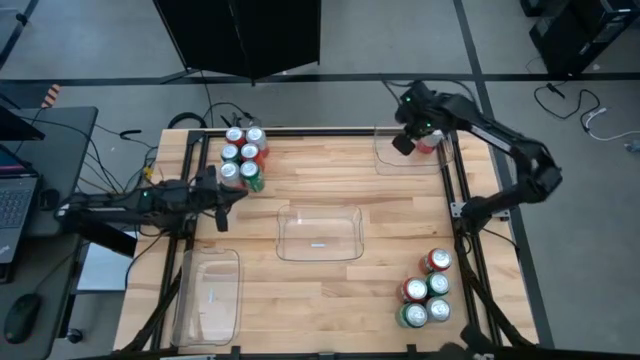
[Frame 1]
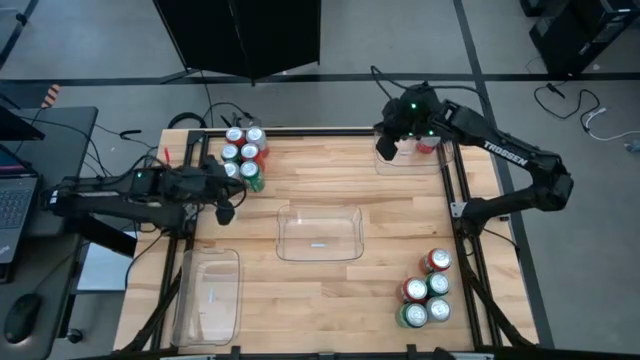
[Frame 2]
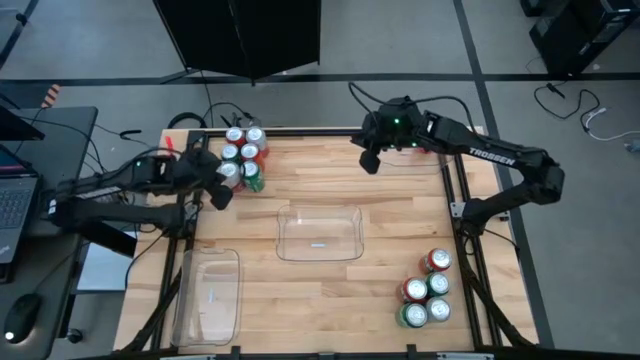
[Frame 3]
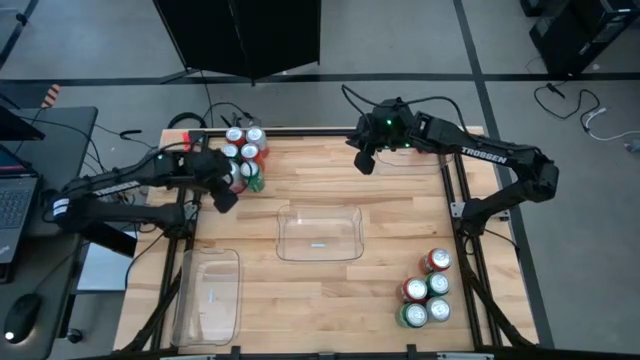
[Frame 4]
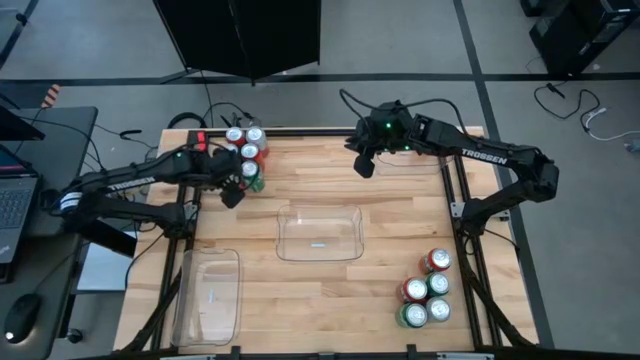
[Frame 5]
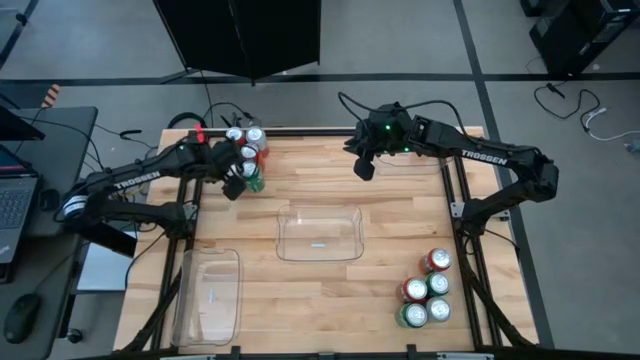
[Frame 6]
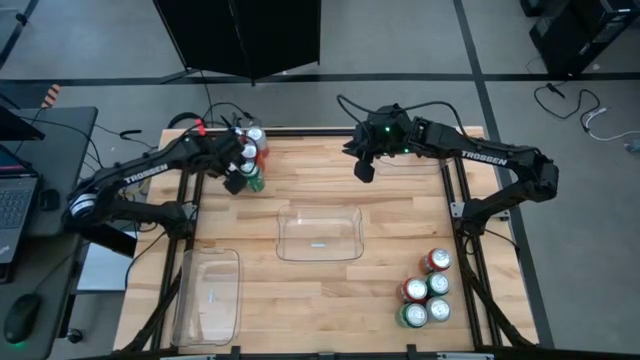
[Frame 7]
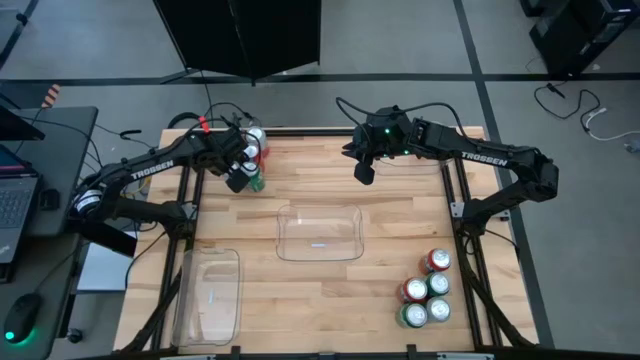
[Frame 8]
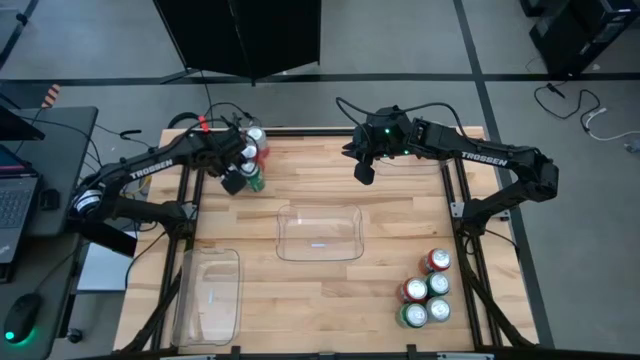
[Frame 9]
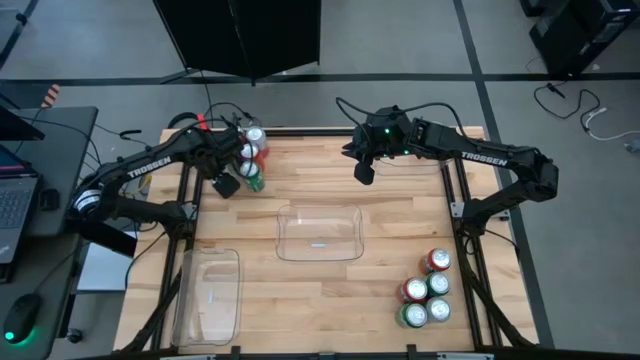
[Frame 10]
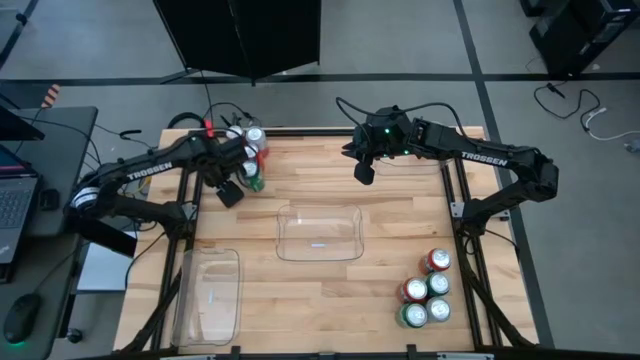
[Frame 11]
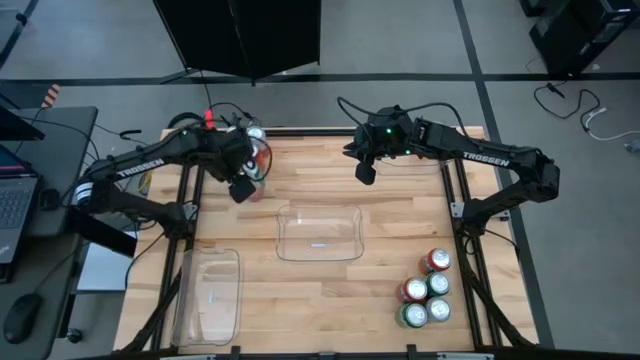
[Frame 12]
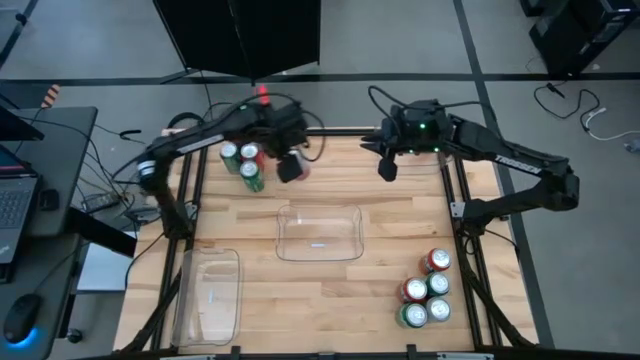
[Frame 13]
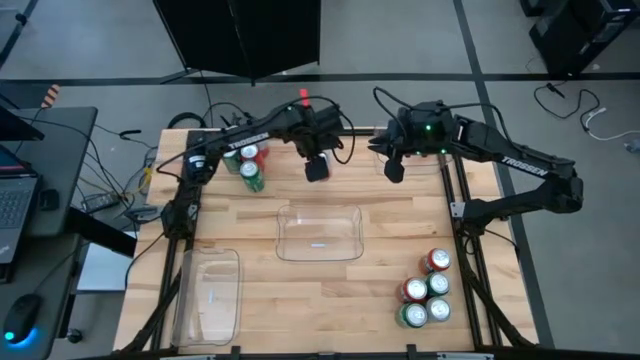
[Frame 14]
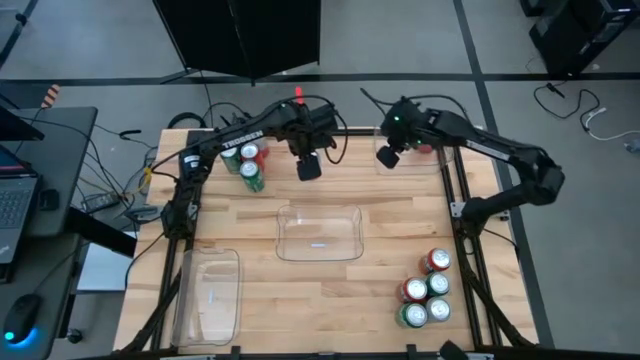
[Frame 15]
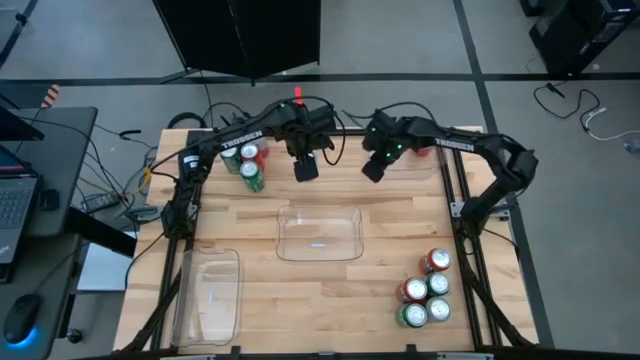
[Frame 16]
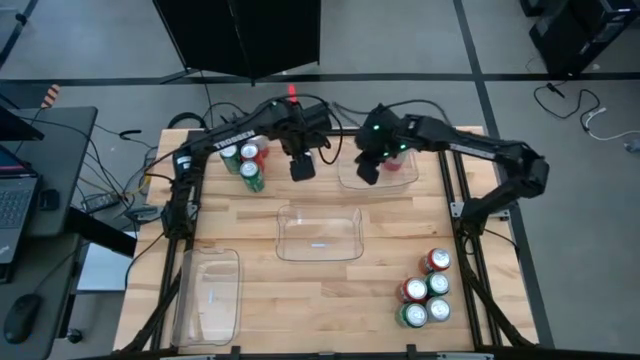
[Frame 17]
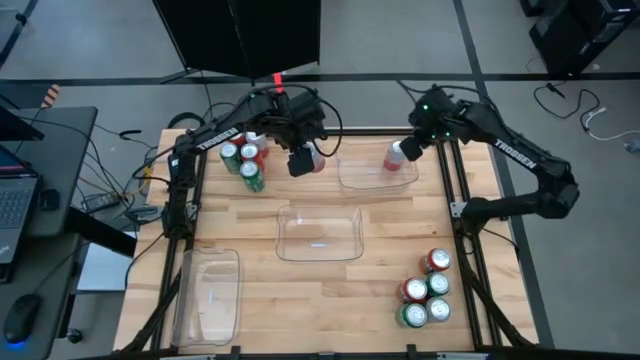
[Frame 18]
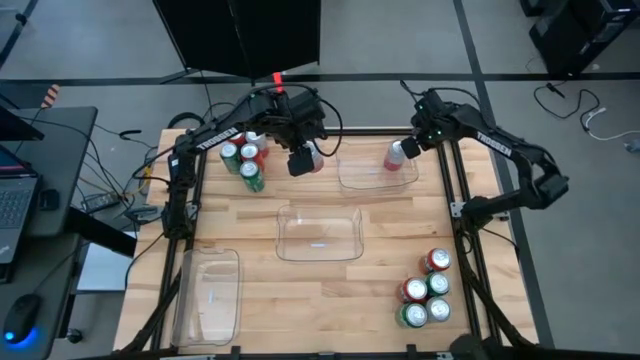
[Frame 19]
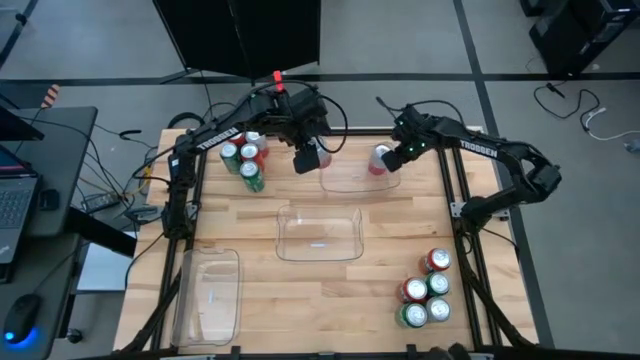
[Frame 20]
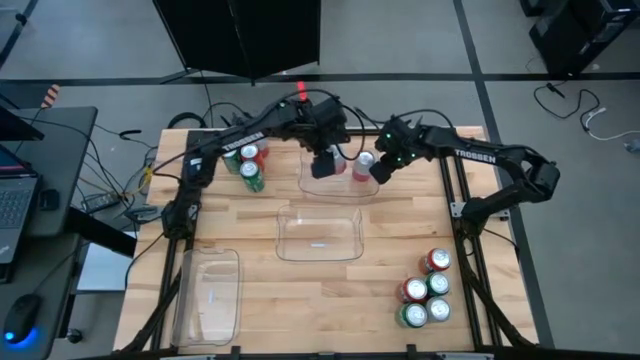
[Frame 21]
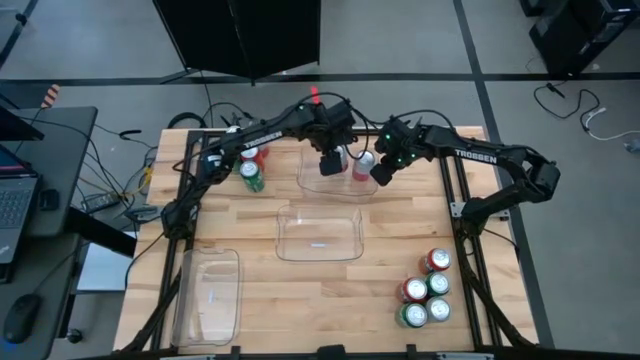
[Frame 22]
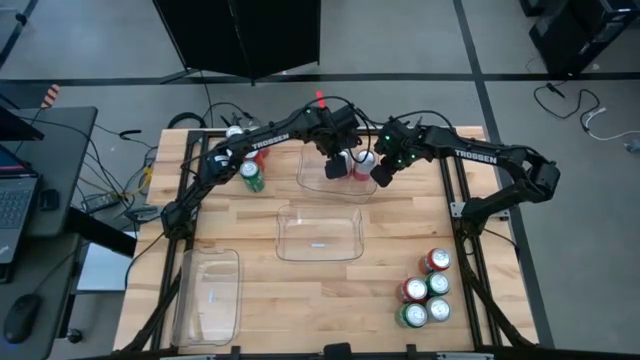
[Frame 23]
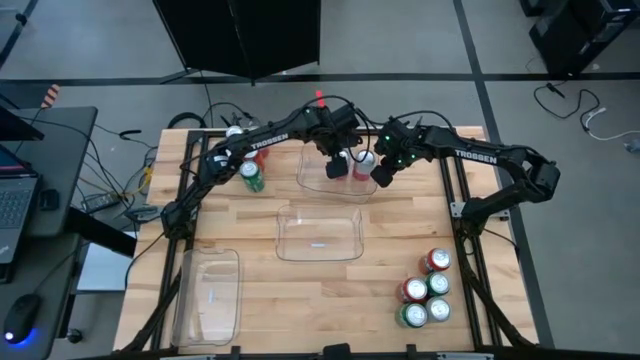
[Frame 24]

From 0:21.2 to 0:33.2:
Task: Sort soda cans
Put the middle pink white soda can into the top transparent bin

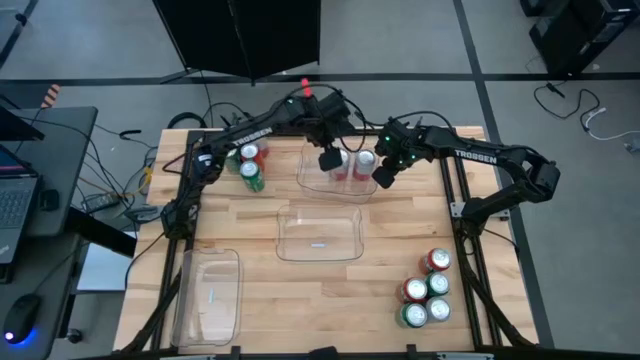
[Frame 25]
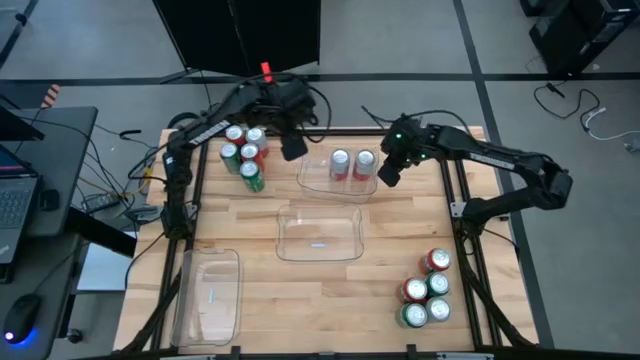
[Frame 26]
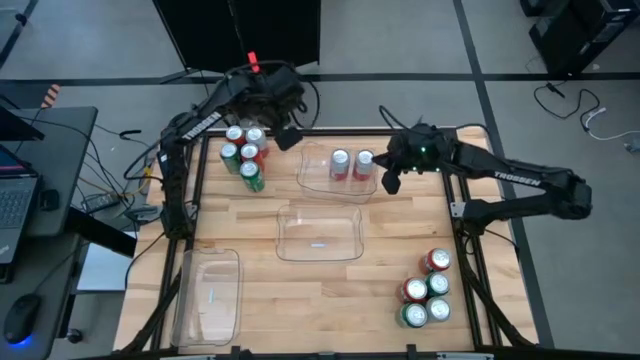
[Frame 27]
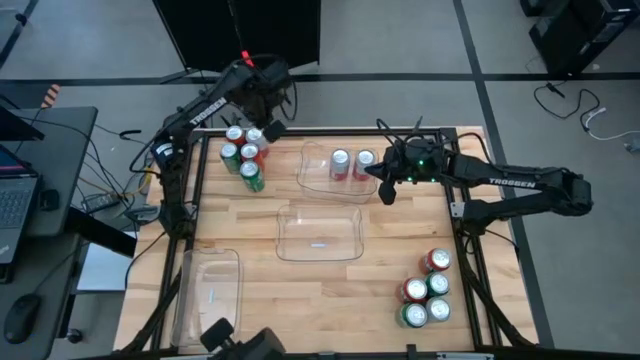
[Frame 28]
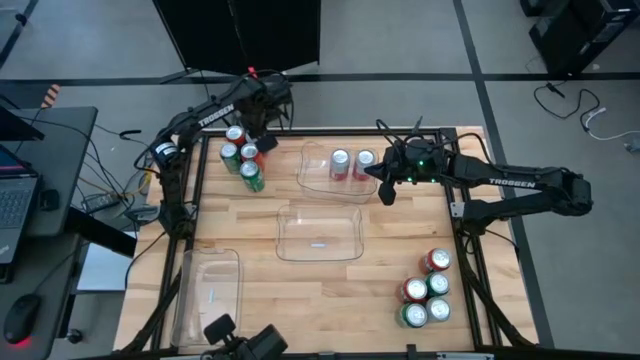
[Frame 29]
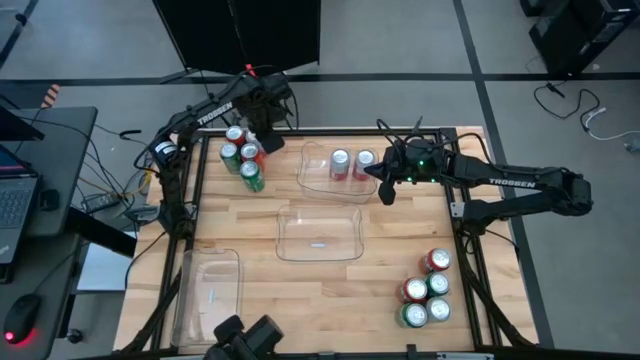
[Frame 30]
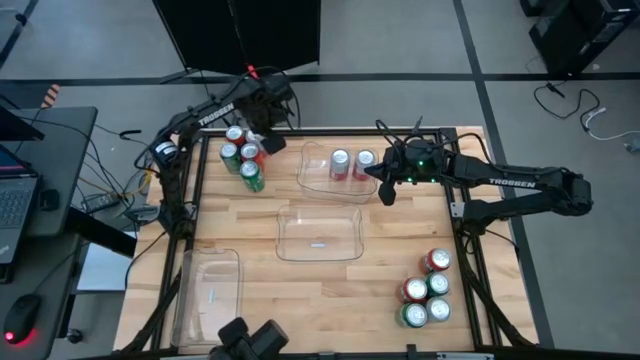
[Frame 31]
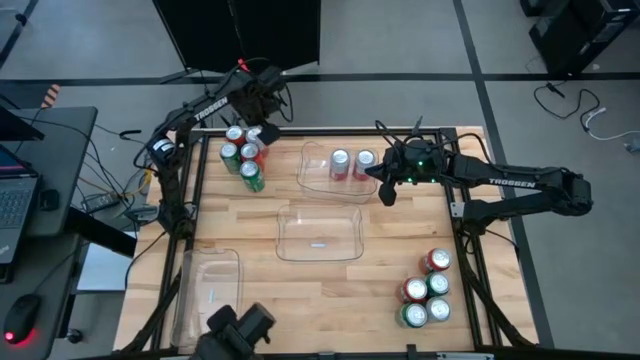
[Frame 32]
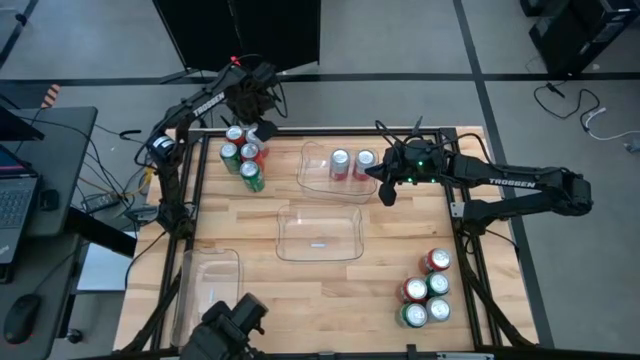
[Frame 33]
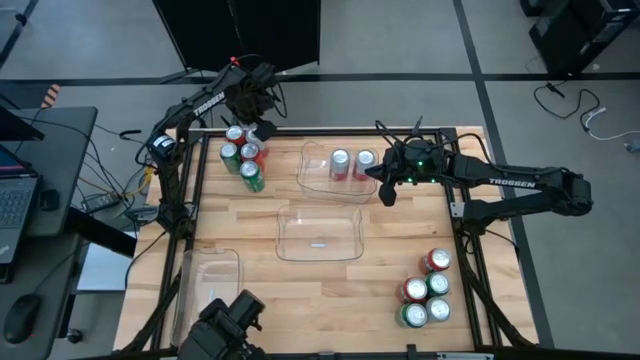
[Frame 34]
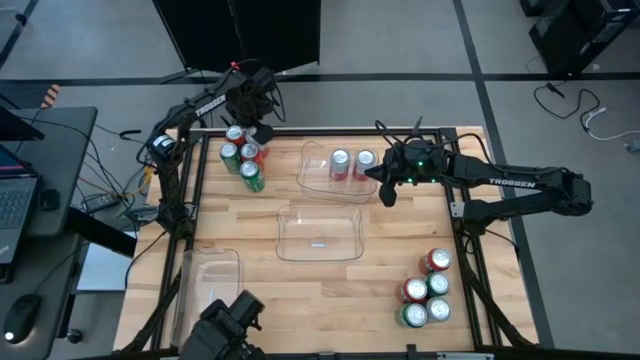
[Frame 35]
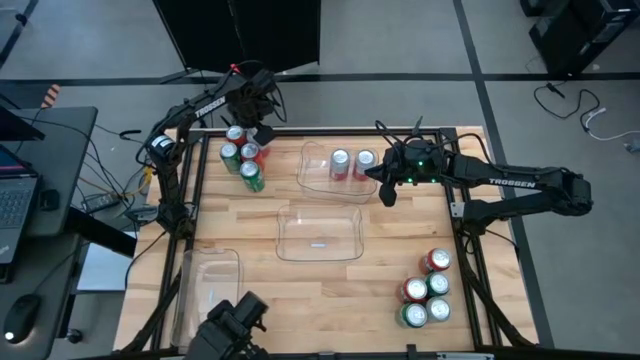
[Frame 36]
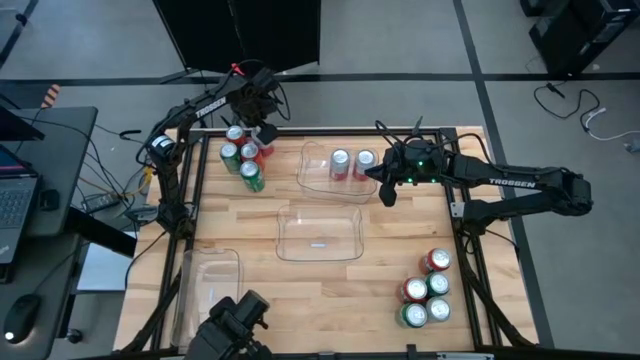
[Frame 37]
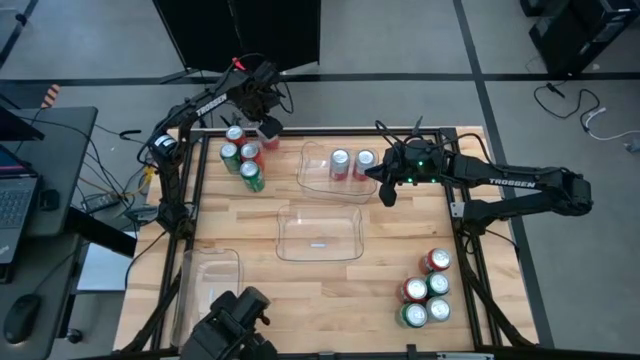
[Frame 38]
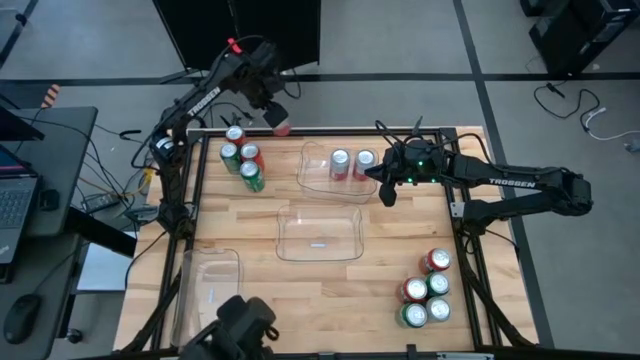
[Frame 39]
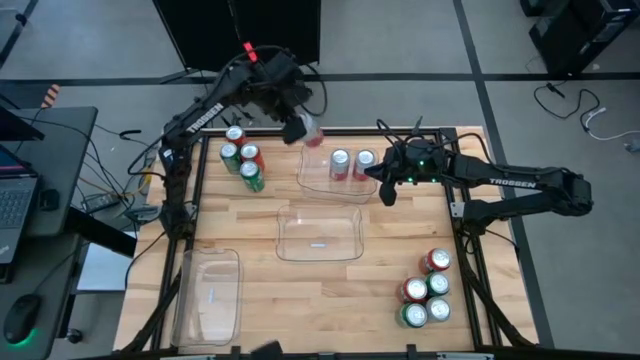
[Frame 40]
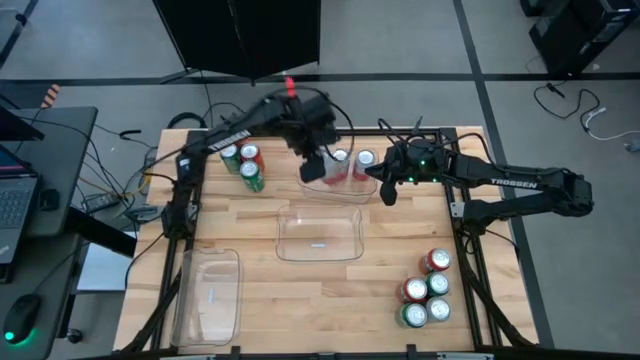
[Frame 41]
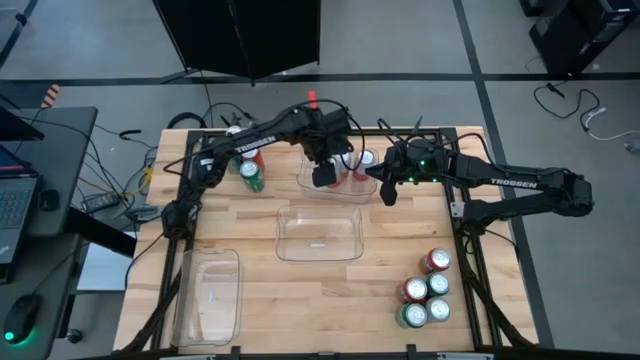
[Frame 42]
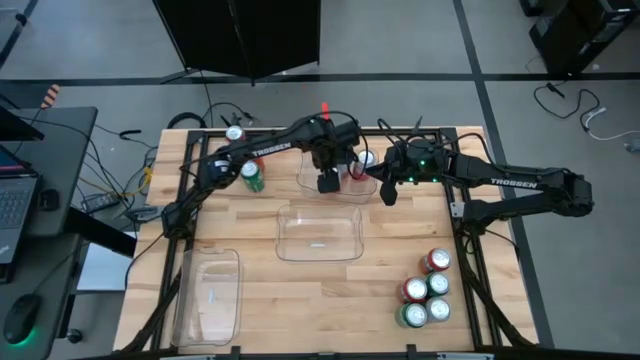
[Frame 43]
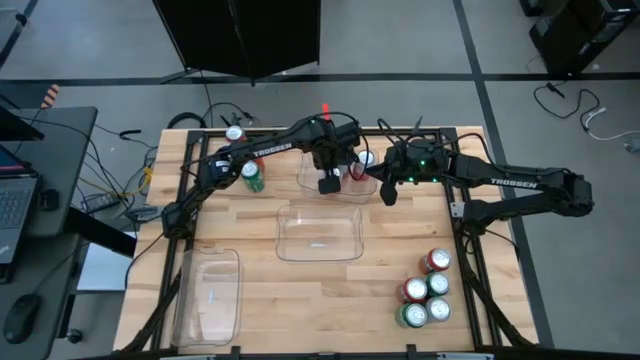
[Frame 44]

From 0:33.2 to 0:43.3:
Put the top pink white soda can into the top transparent bin
